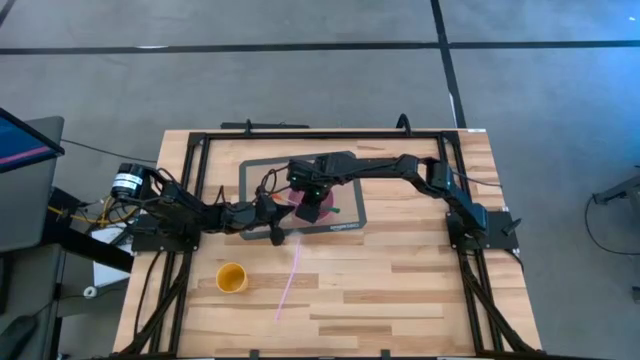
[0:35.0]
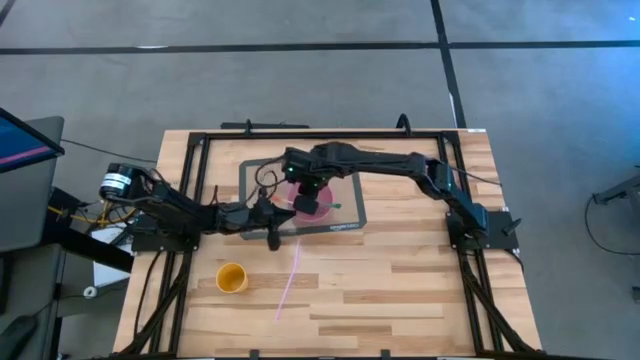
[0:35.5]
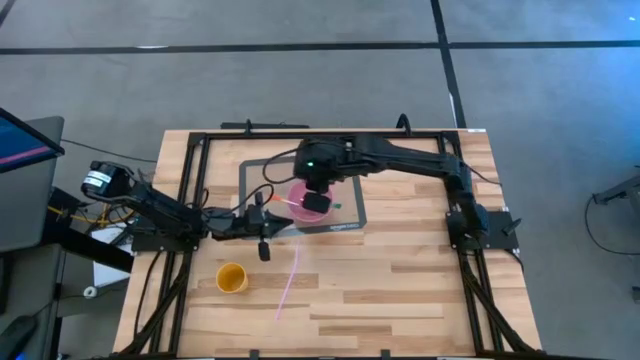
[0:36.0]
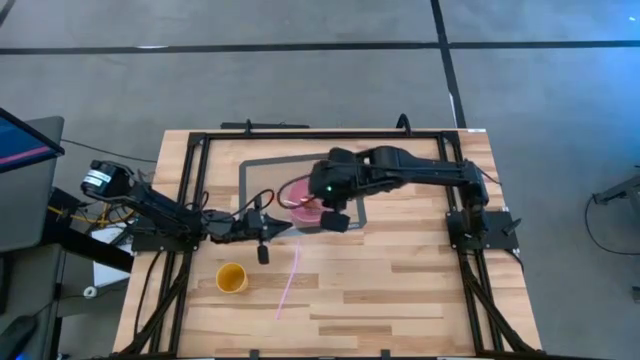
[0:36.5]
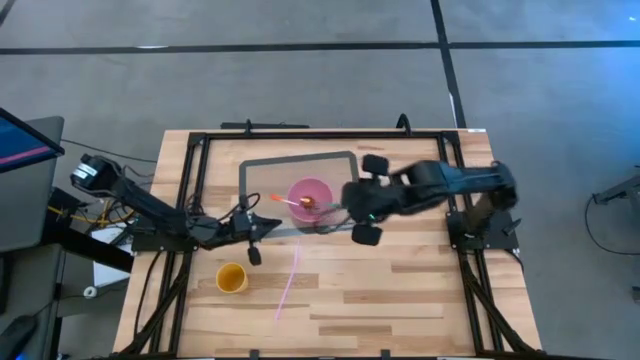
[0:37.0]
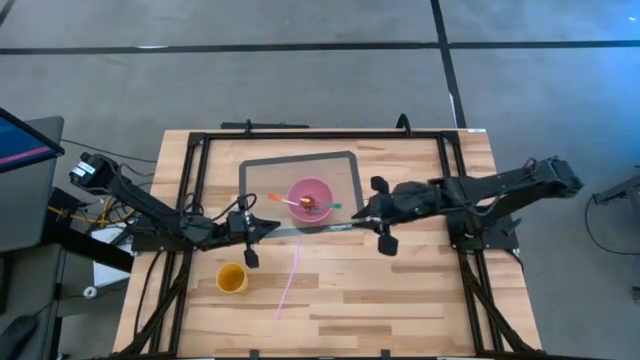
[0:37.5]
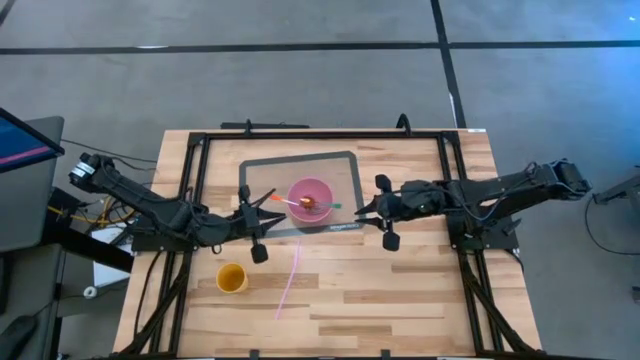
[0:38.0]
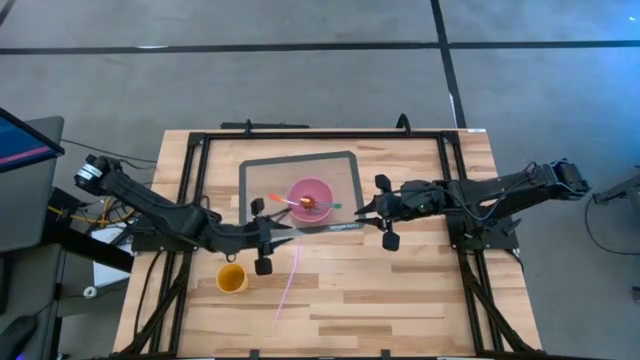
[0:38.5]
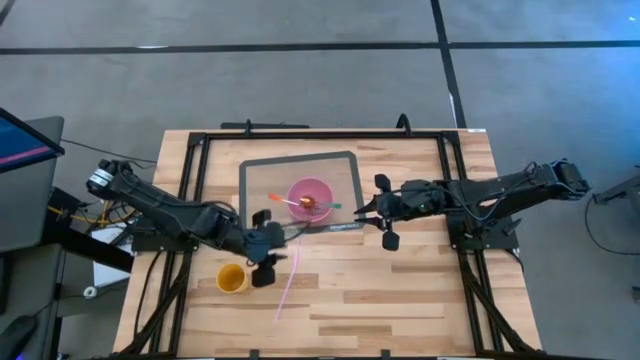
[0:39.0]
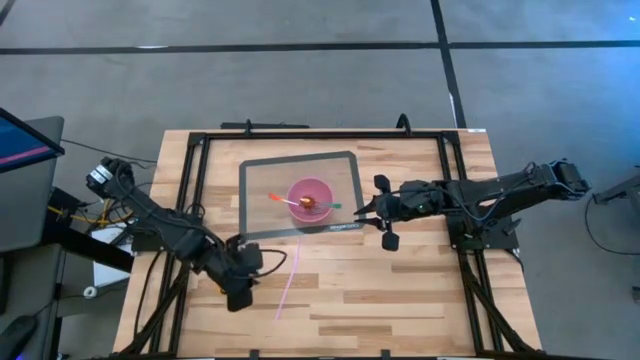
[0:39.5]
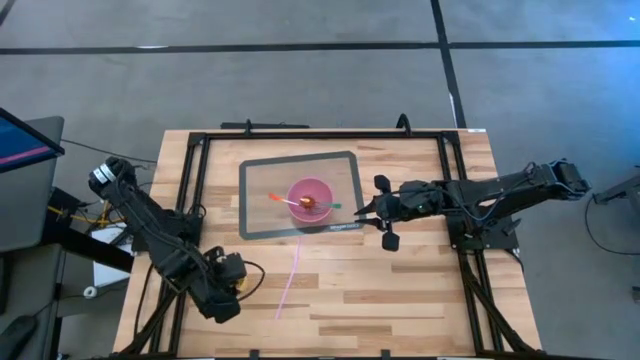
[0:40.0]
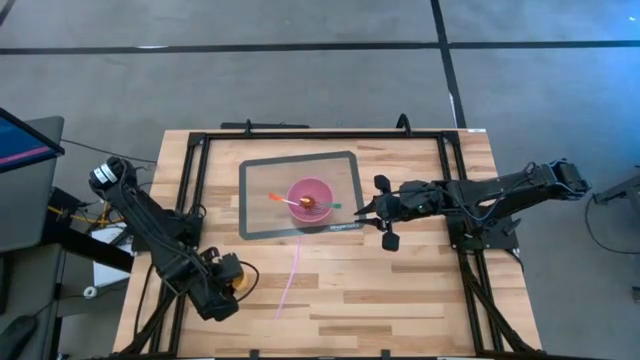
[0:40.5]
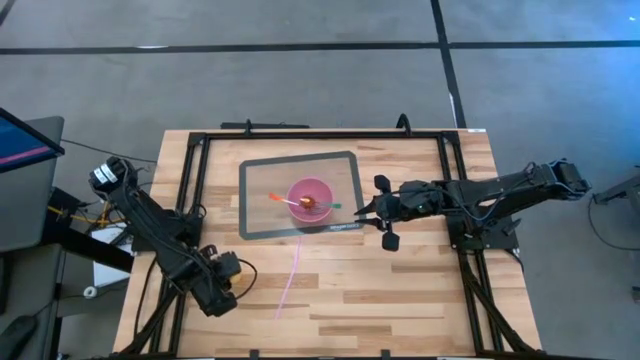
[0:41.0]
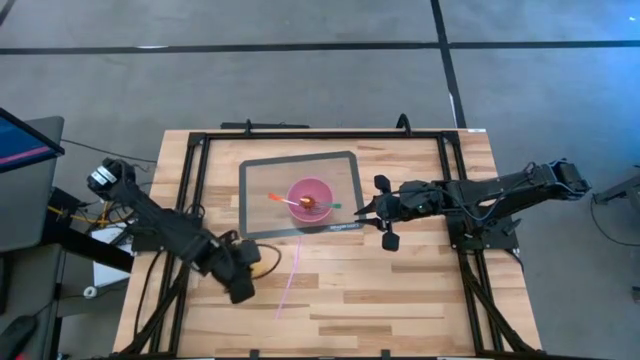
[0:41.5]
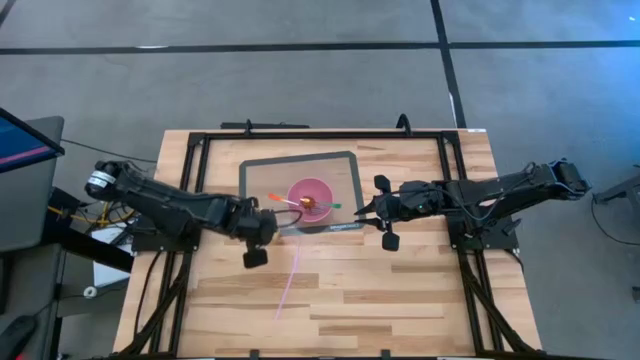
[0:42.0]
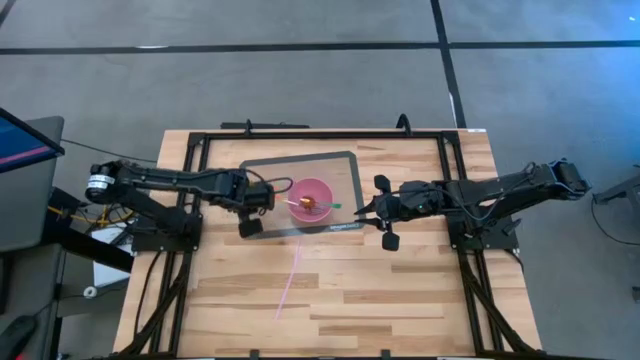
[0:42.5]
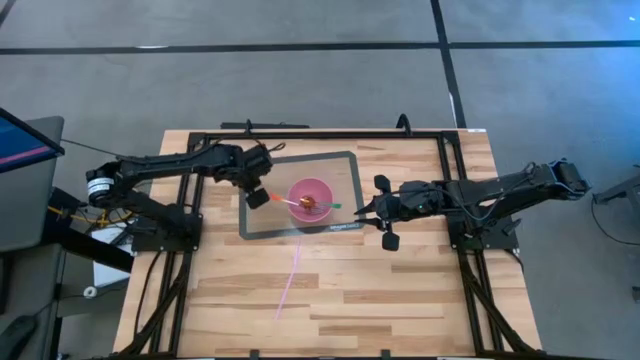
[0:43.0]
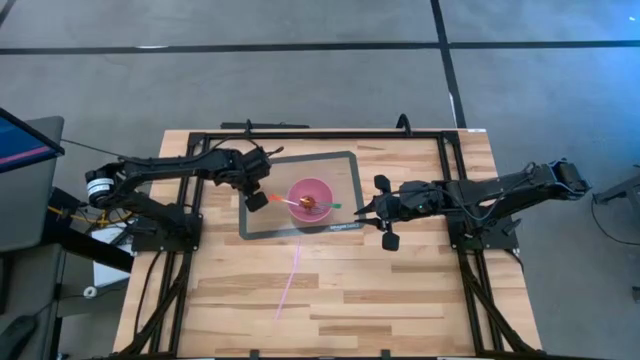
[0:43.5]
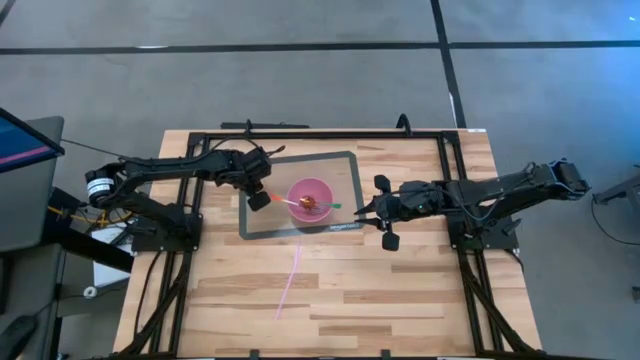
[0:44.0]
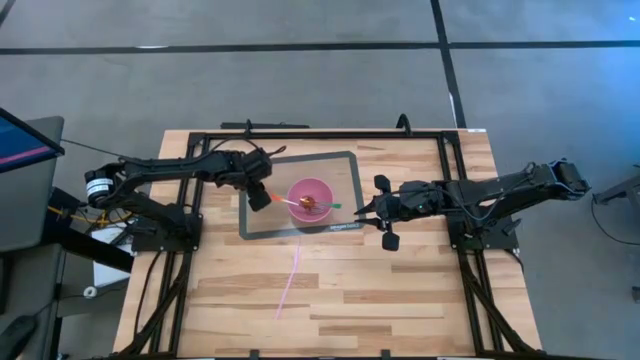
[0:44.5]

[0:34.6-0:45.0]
Task: Pick & Place Utensil
Put the yellow cup to the top left of the pink bowl on the transparent mat

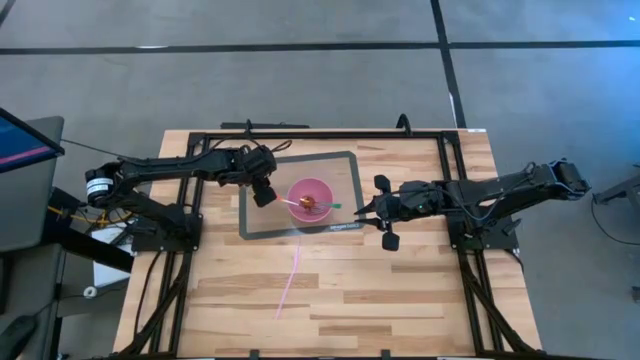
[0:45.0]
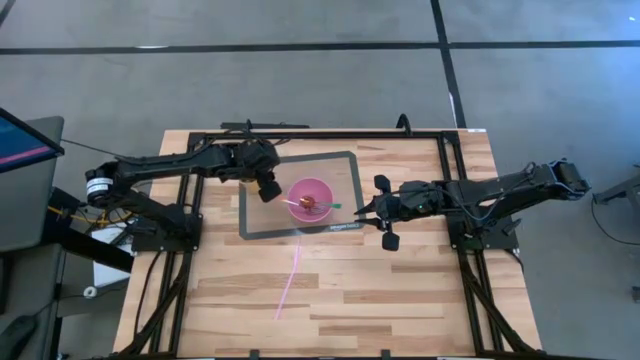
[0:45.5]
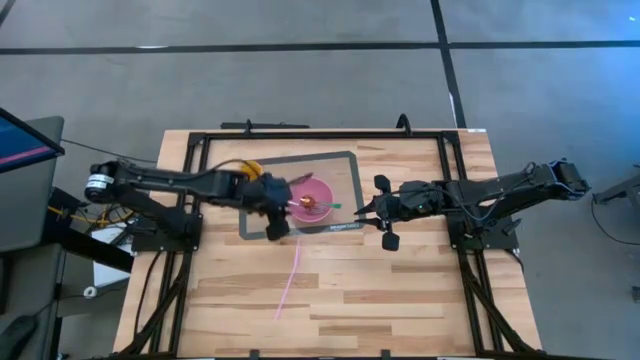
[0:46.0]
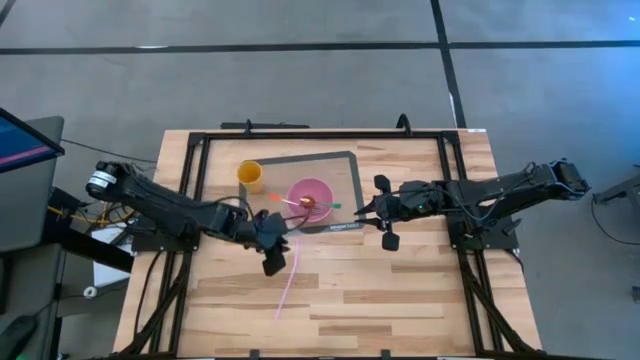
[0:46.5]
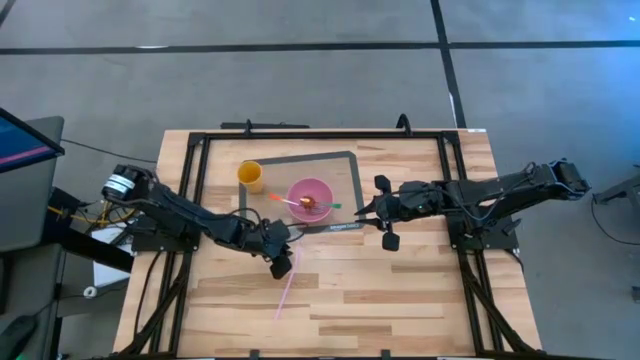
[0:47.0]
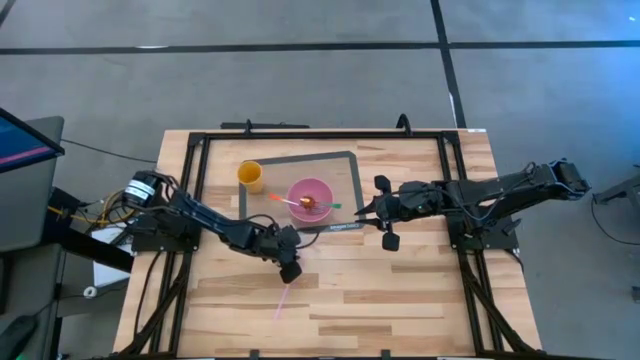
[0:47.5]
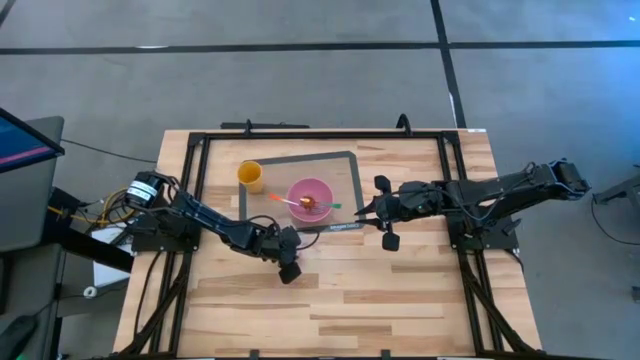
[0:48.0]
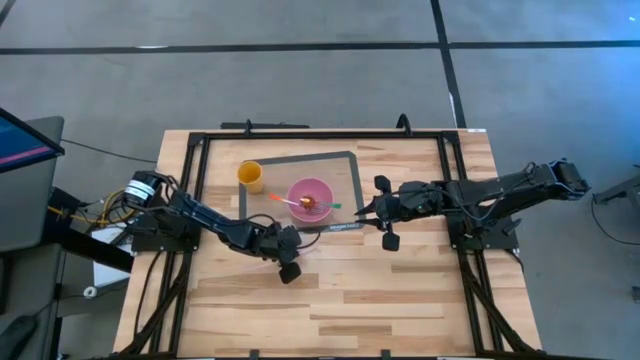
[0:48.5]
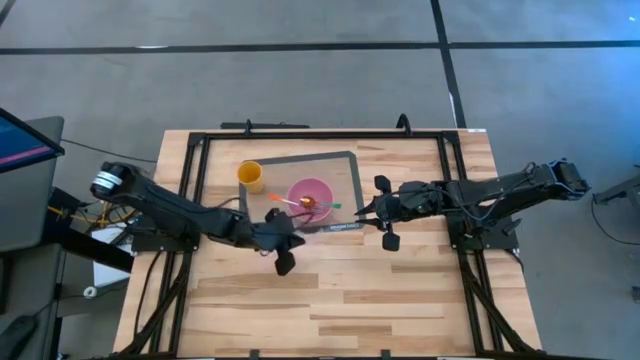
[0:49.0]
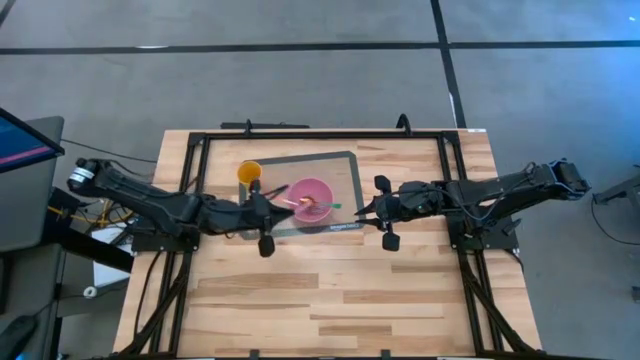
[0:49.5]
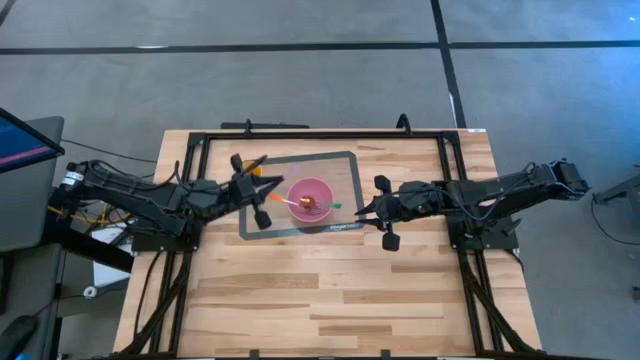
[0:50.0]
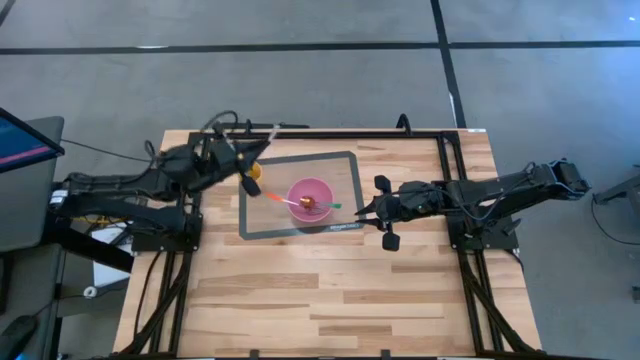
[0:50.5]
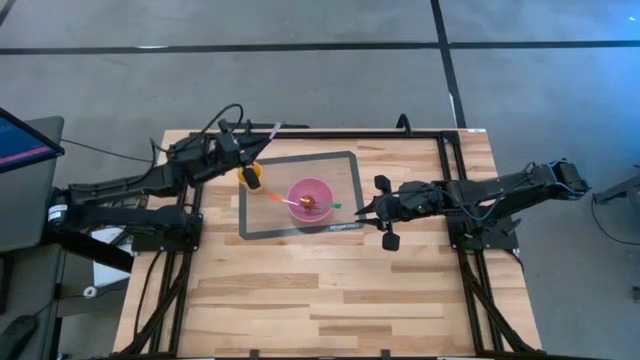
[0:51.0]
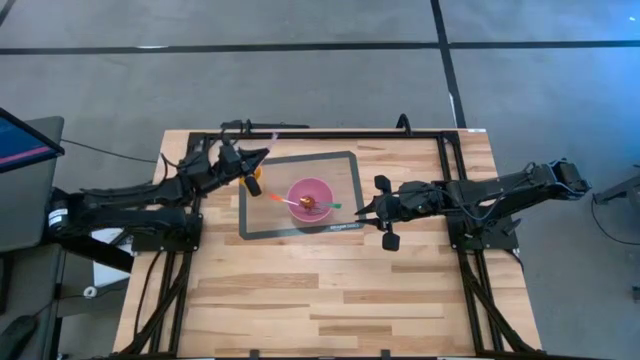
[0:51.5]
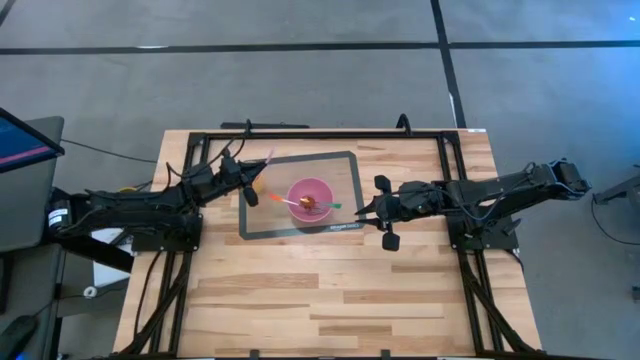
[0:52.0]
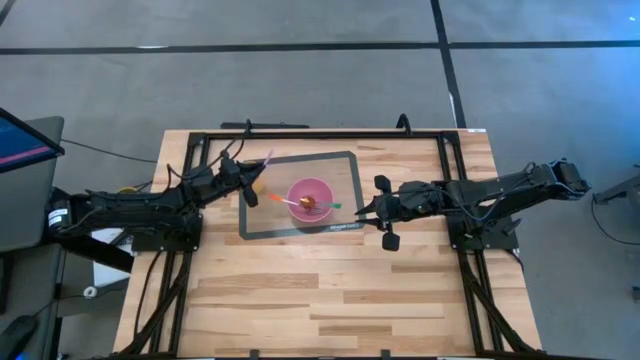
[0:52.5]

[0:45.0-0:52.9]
Put the pink straw into the yellow cup on the transparent mat

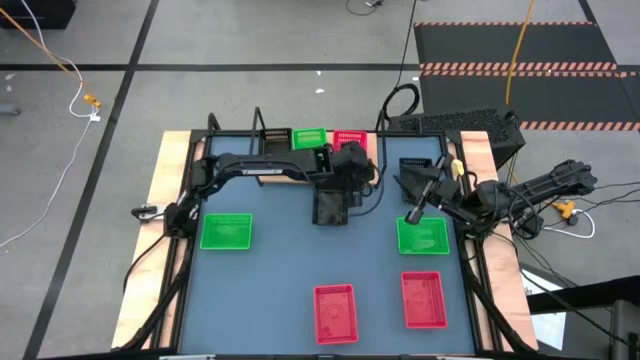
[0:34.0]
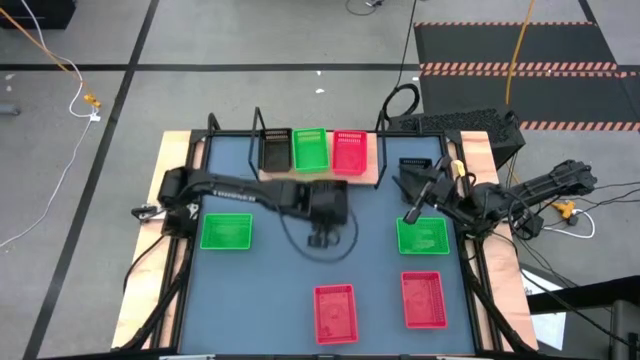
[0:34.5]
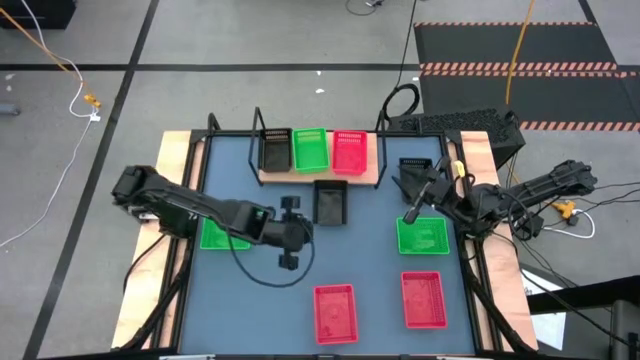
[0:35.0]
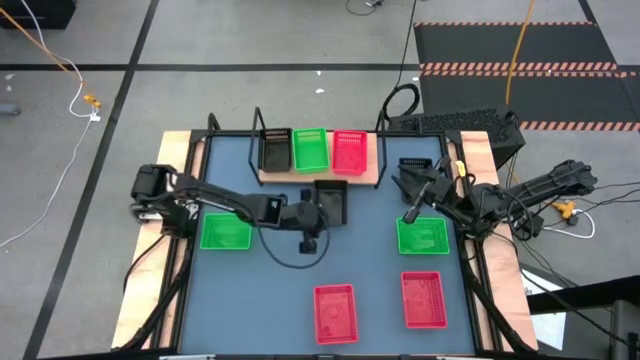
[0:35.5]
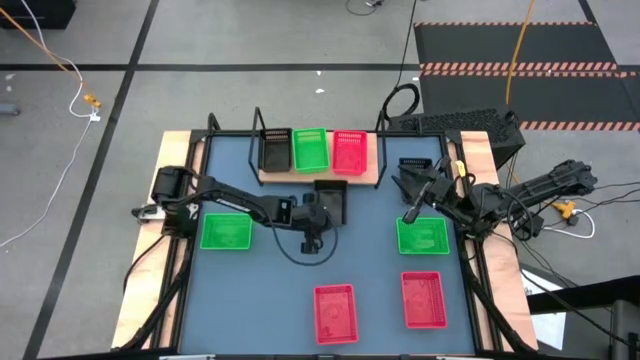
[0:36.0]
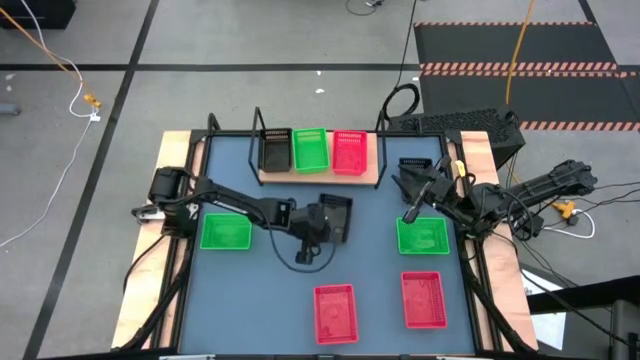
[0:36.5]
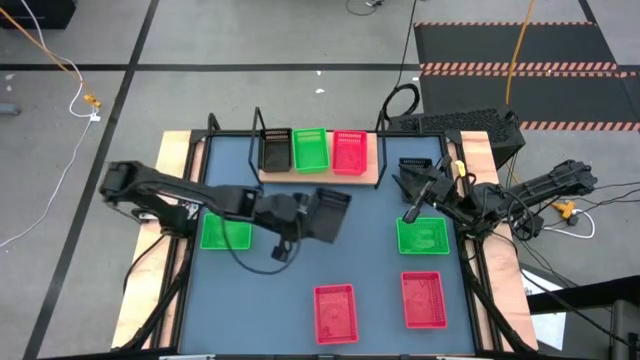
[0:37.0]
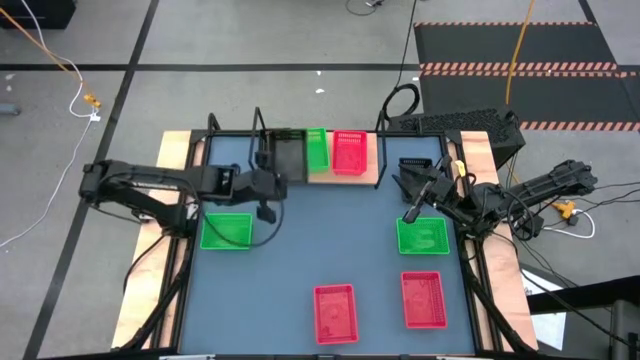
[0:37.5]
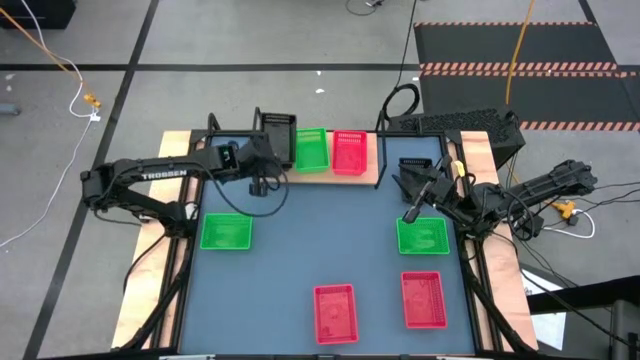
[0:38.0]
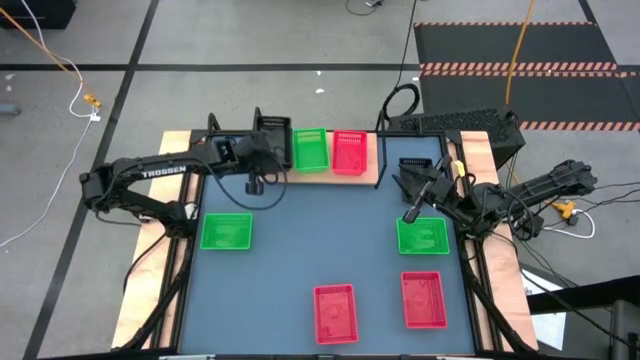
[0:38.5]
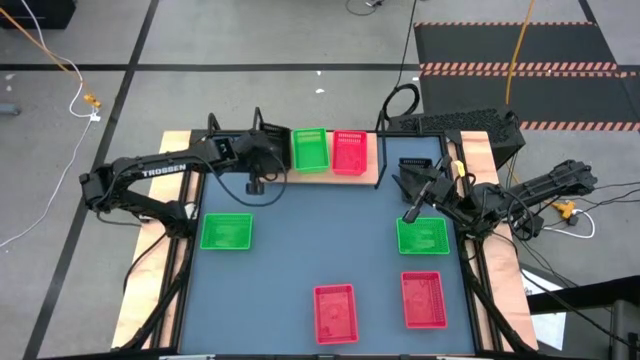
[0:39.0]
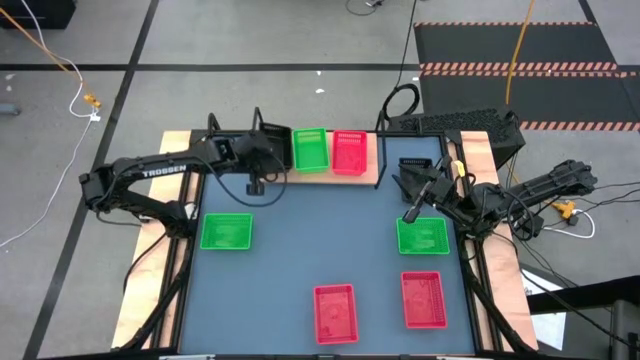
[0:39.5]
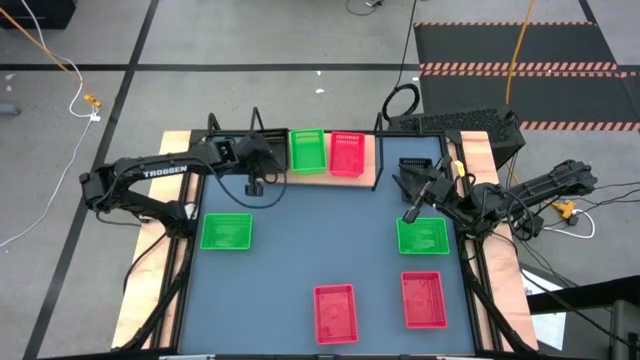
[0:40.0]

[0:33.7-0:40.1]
Task: Stack baskets on shelf by color
Stack the left black bin on top of the black bin on the shelf
